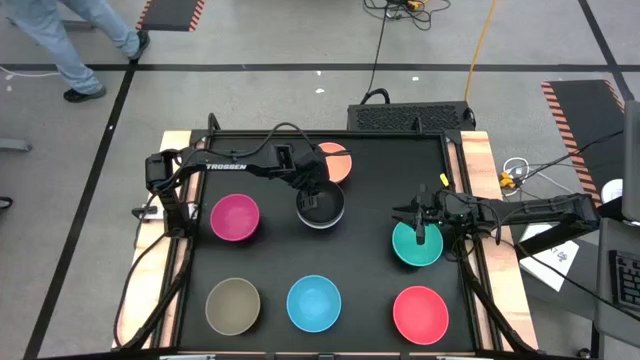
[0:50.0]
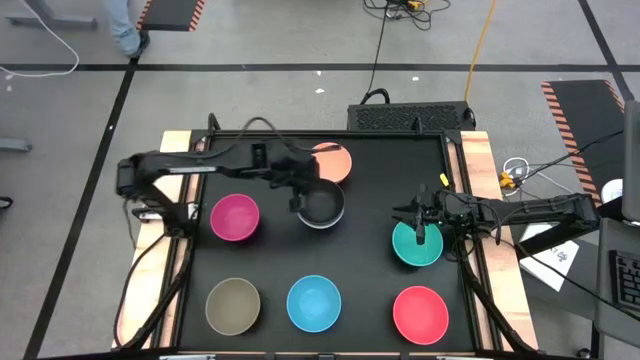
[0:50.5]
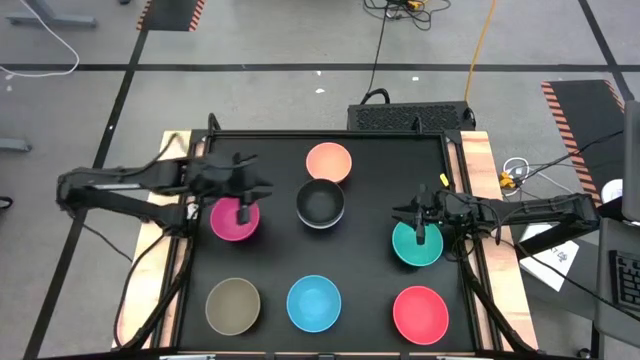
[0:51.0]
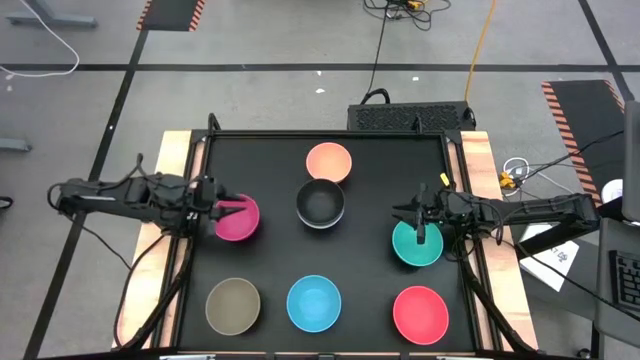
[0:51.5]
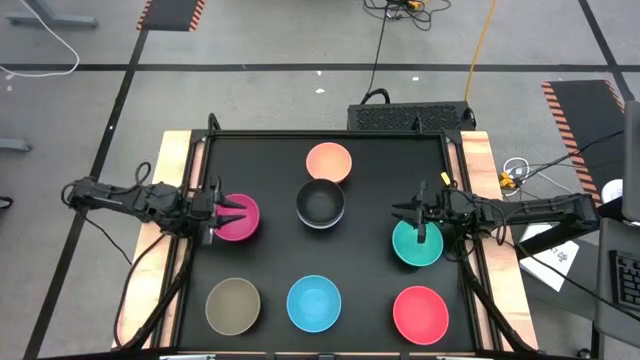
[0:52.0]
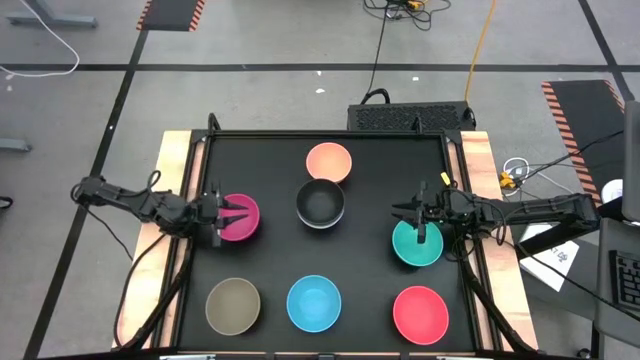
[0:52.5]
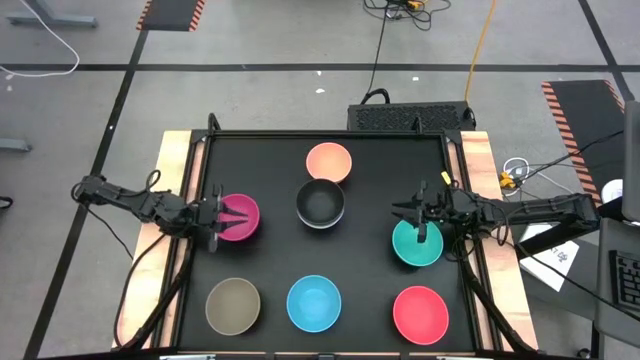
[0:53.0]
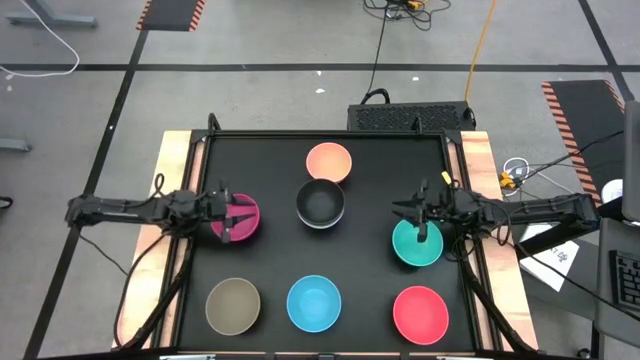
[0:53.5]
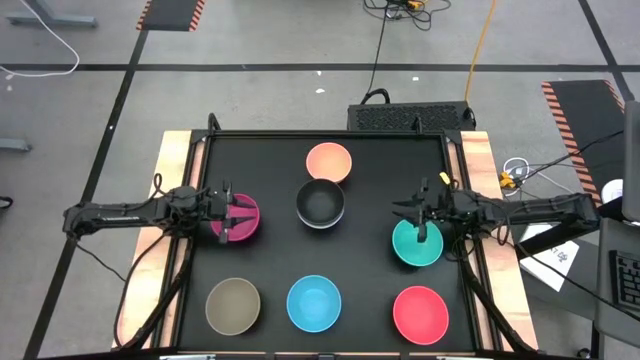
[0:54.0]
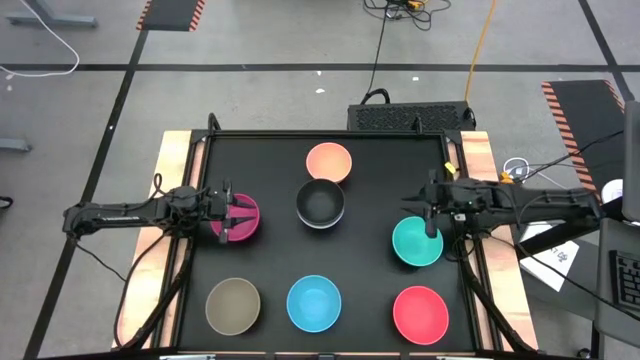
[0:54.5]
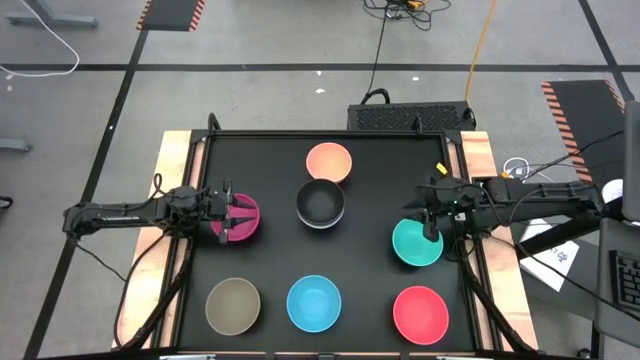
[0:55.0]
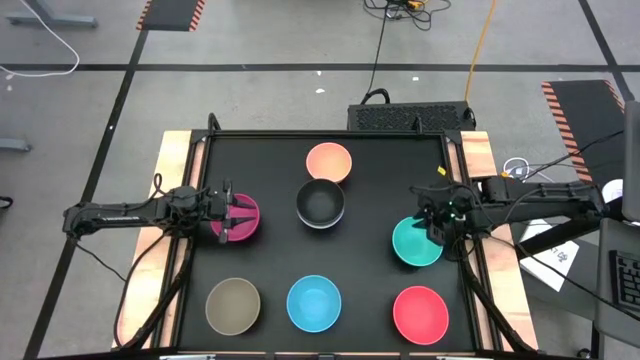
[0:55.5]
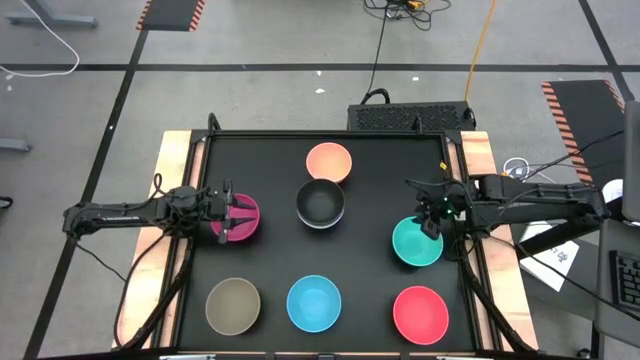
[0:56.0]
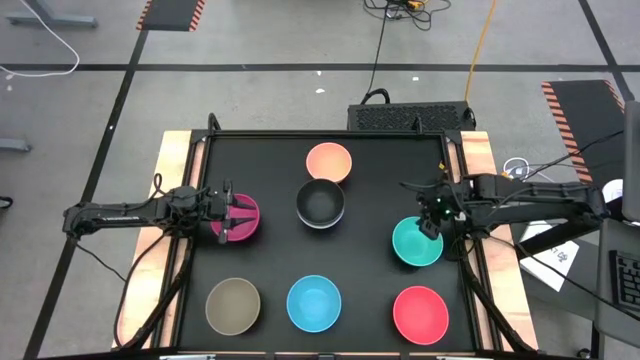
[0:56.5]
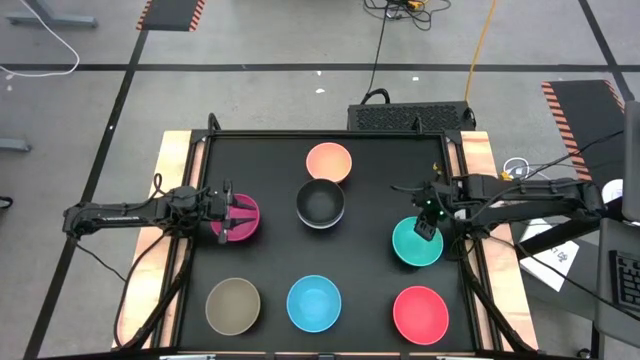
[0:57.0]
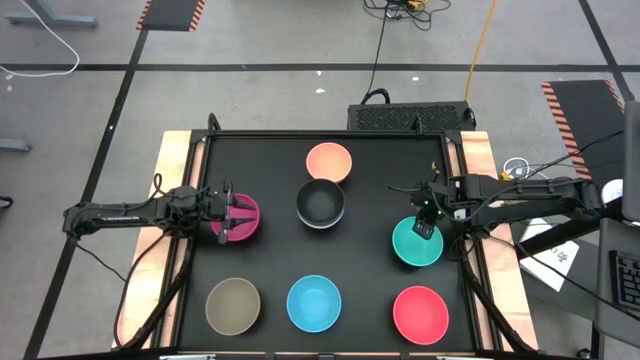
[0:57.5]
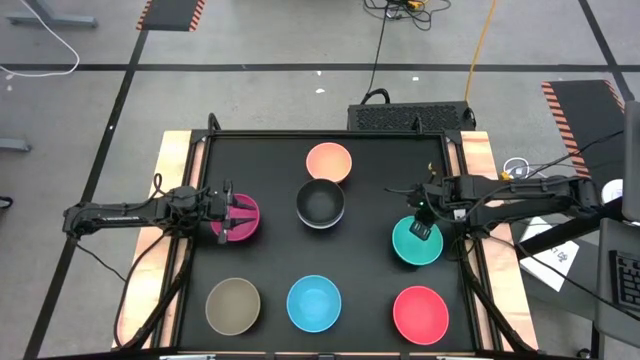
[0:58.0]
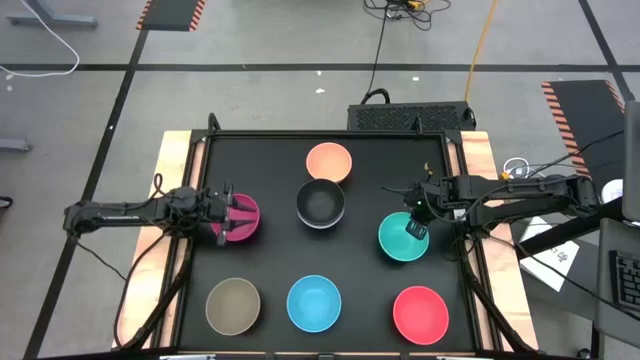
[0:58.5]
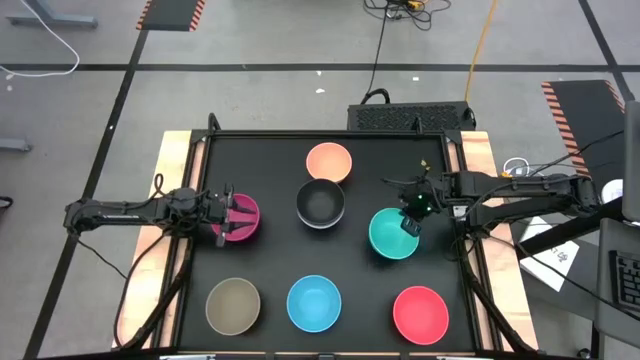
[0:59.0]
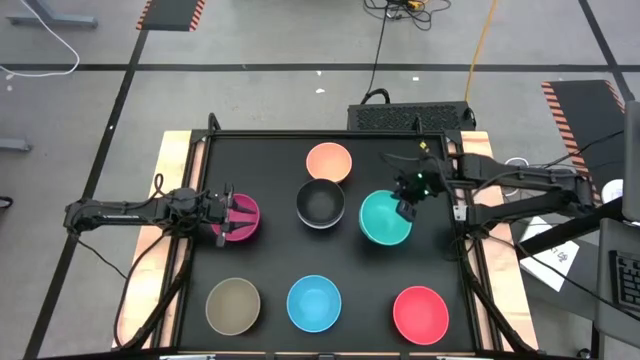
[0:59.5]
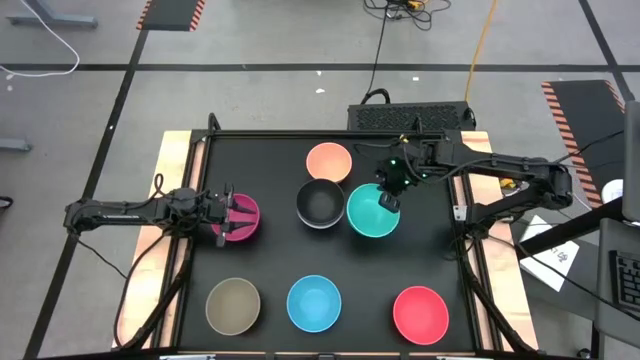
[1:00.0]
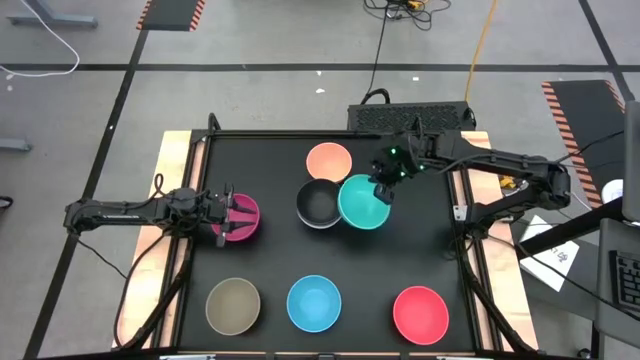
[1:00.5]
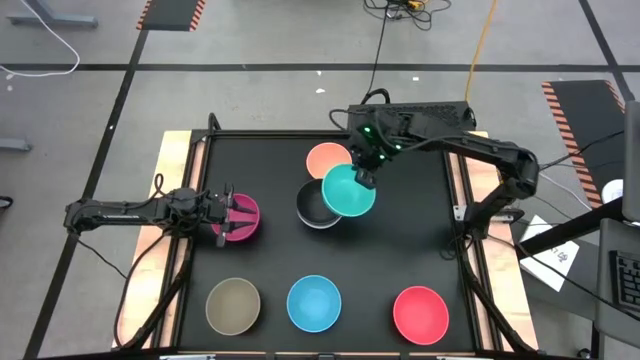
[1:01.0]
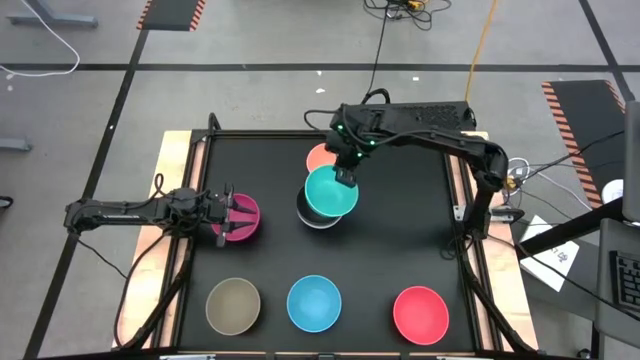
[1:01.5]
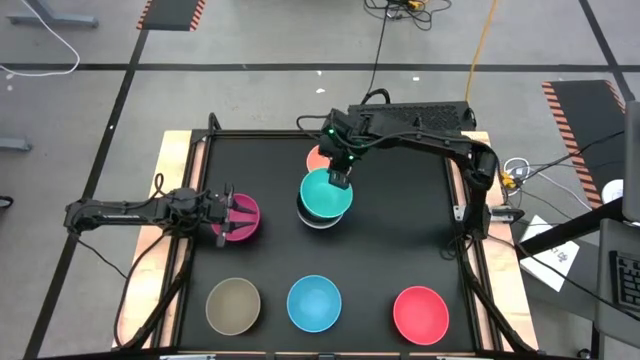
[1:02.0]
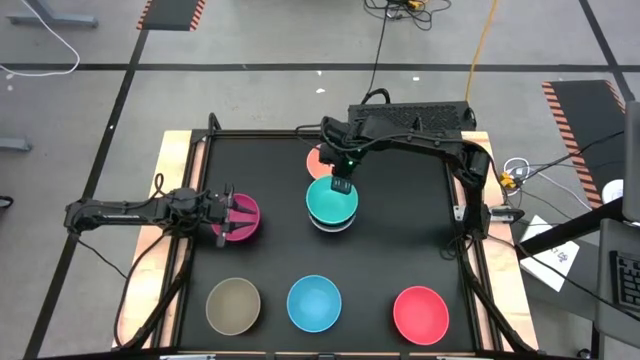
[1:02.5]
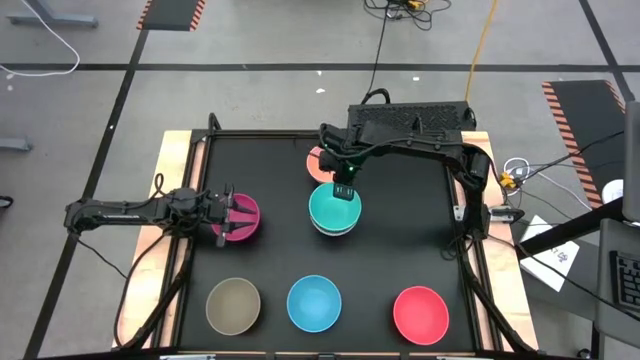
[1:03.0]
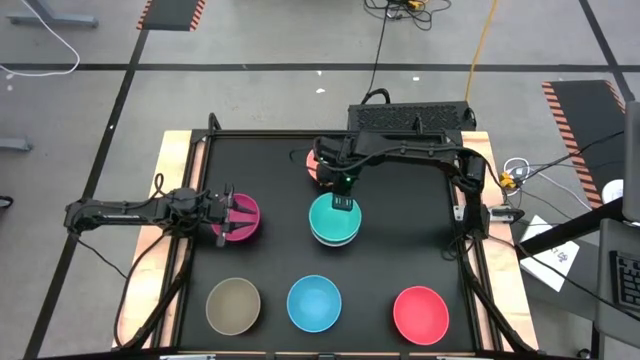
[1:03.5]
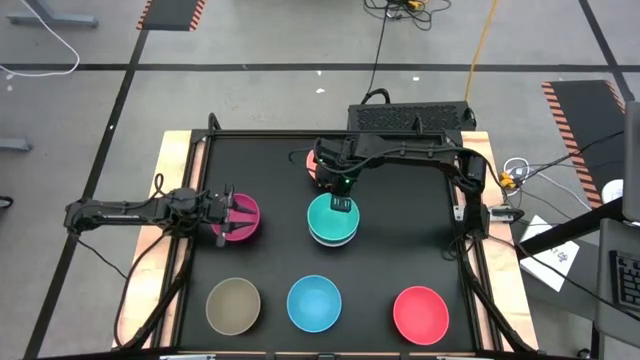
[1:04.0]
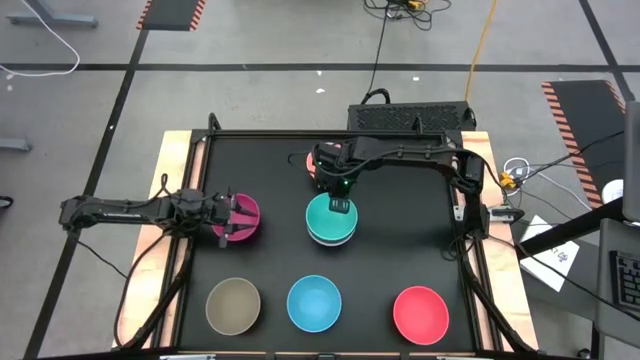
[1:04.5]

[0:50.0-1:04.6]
Task: Nest bowls inside each other
Stack the light blue bowl on the black bowl

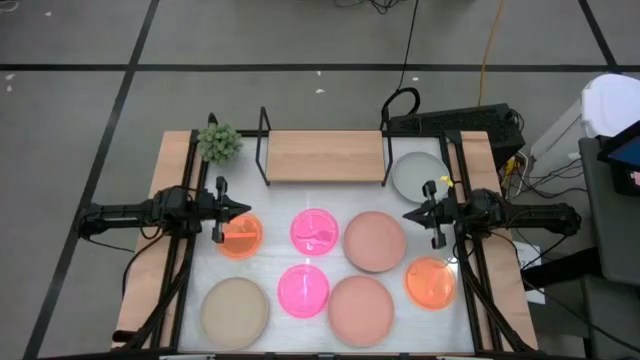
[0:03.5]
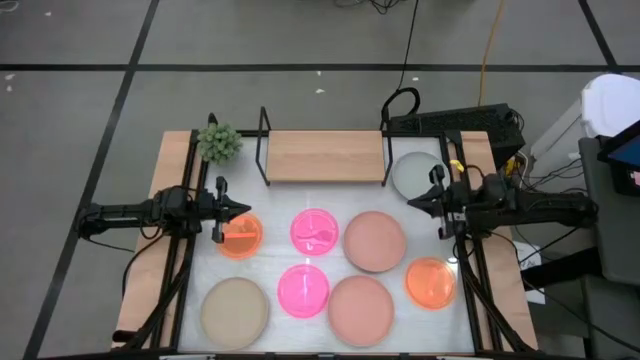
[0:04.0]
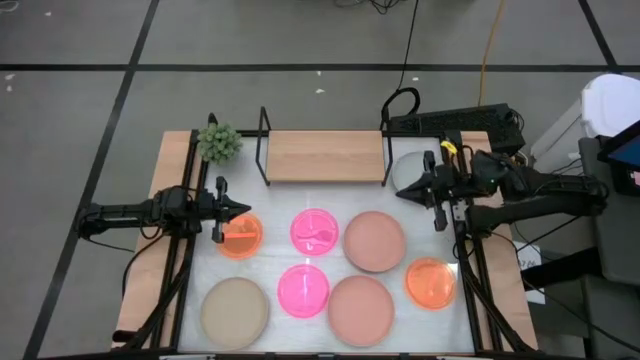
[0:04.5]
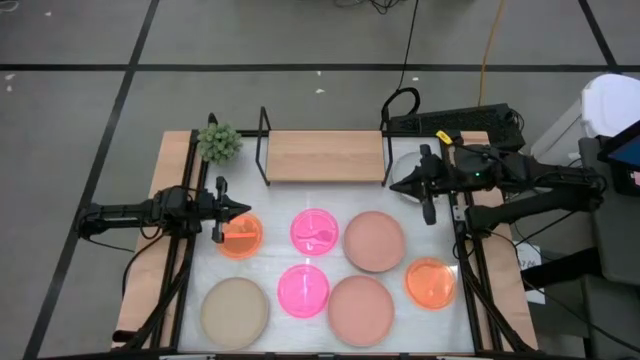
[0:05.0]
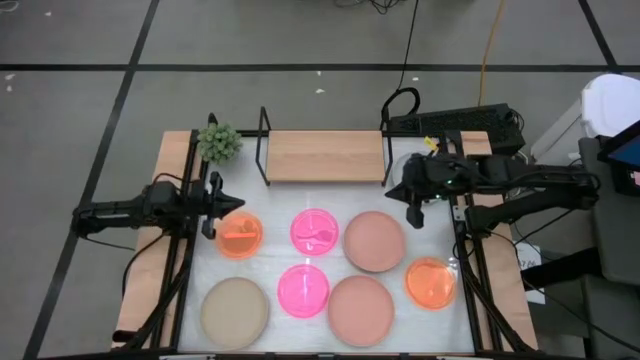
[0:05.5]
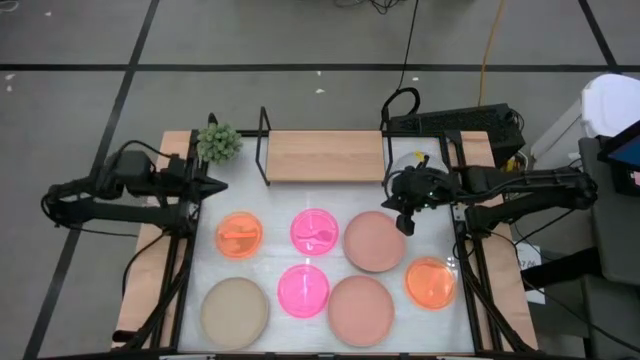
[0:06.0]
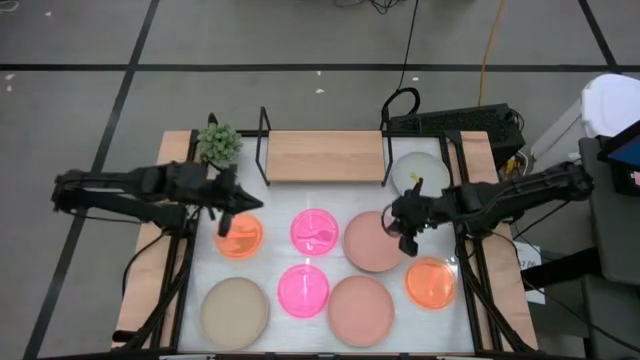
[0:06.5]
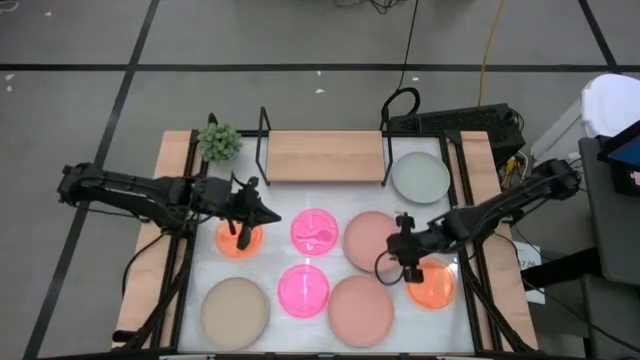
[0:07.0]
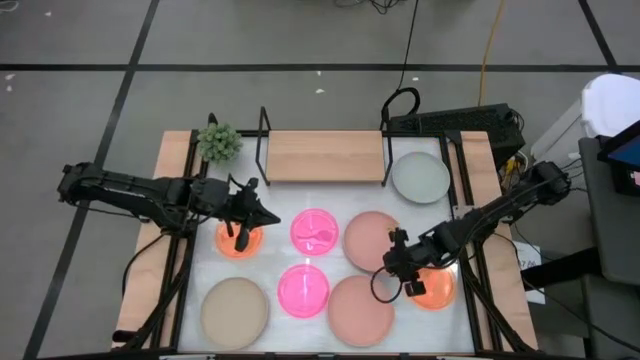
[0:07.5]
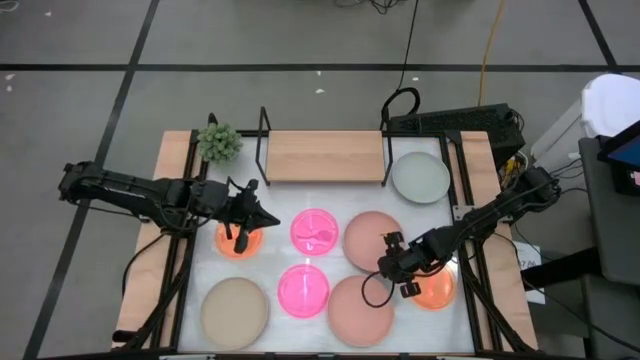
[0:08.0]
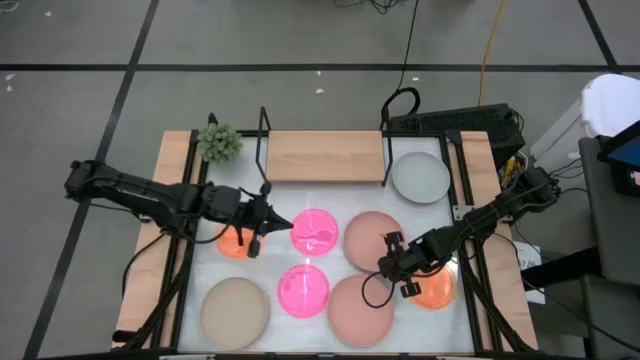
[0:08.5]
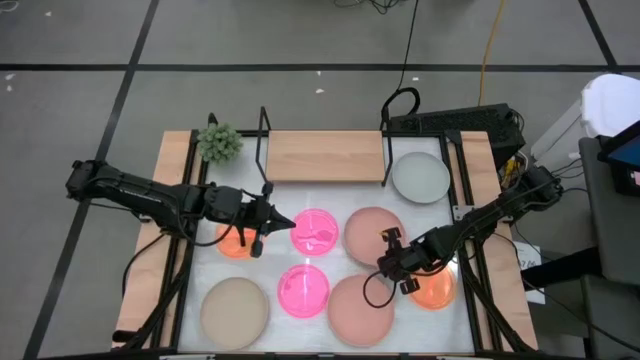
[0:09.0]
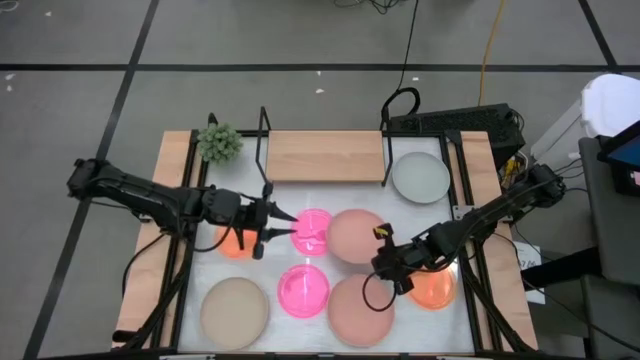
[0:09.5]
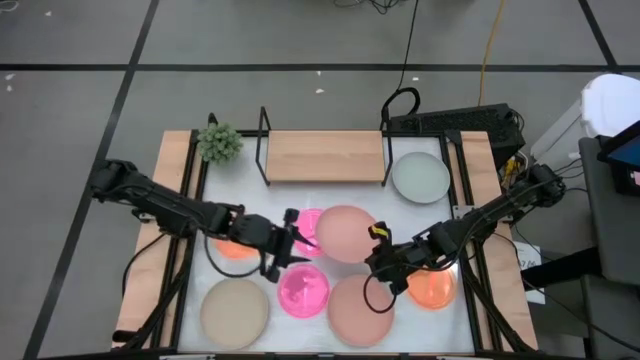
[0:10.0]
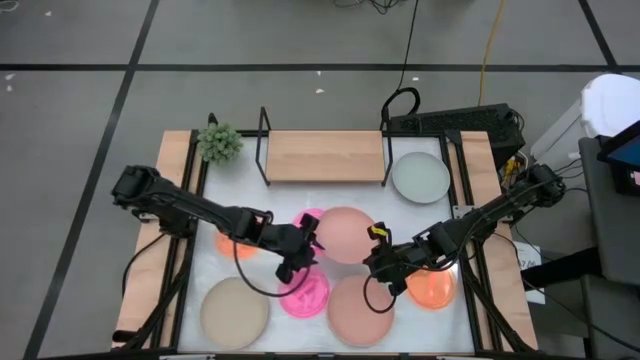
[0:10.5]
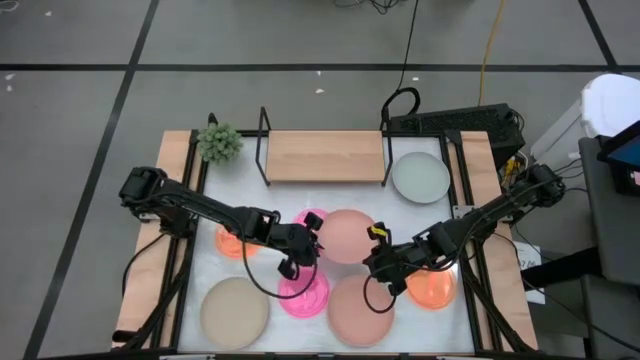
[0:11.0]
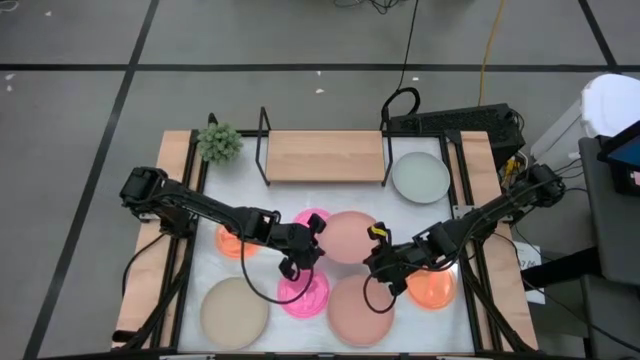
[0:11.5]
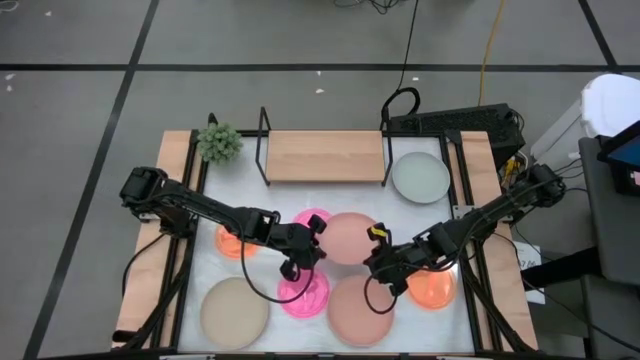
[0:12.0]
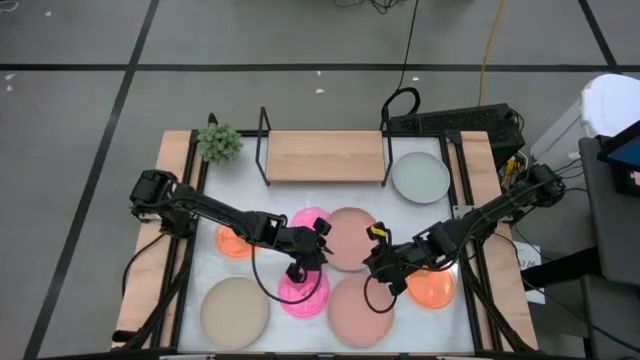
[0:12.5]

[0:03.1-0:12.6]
Task: Place and stack plates onto a shelf
Put the top light orange plate on the shelf
